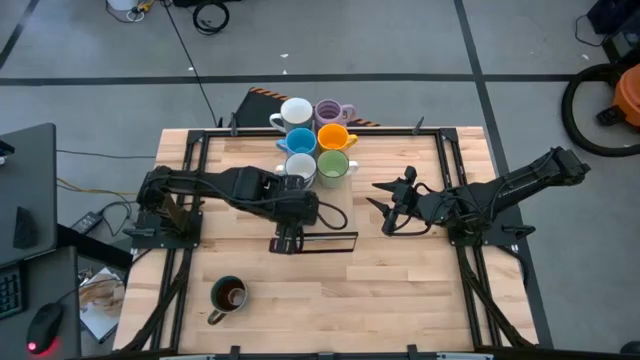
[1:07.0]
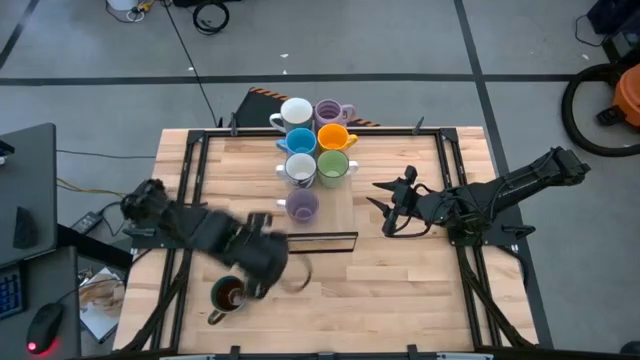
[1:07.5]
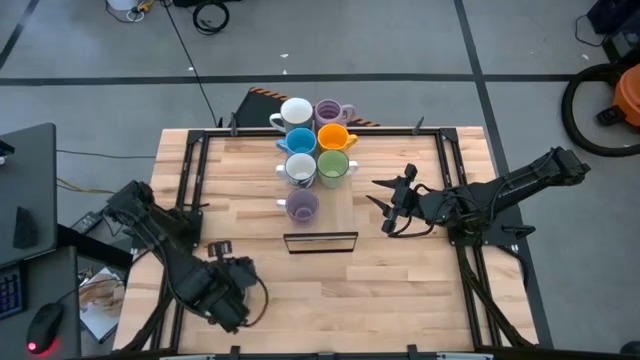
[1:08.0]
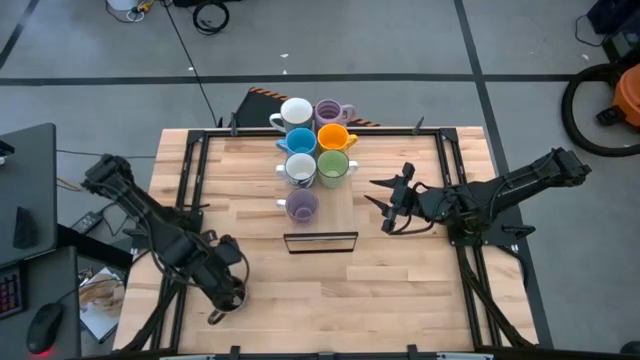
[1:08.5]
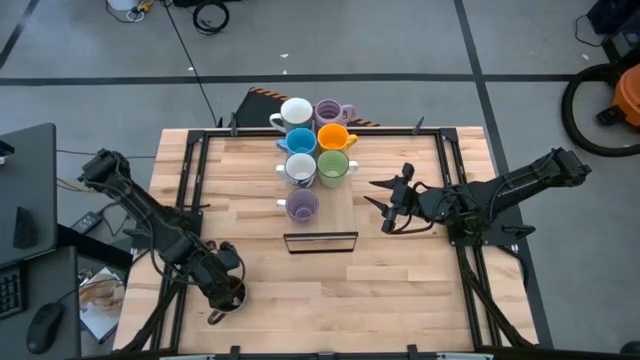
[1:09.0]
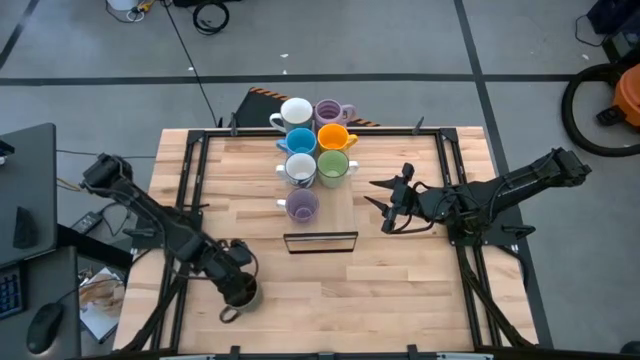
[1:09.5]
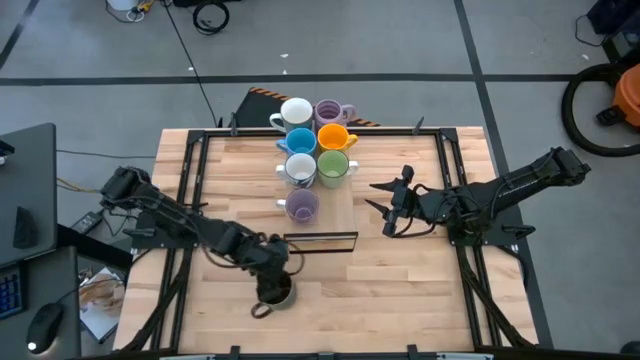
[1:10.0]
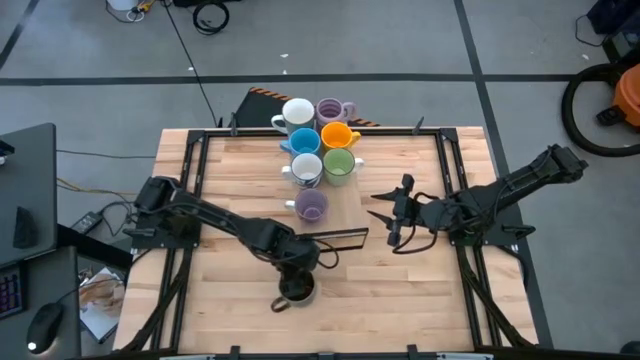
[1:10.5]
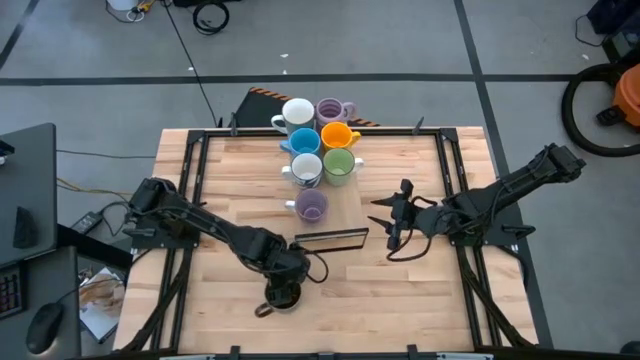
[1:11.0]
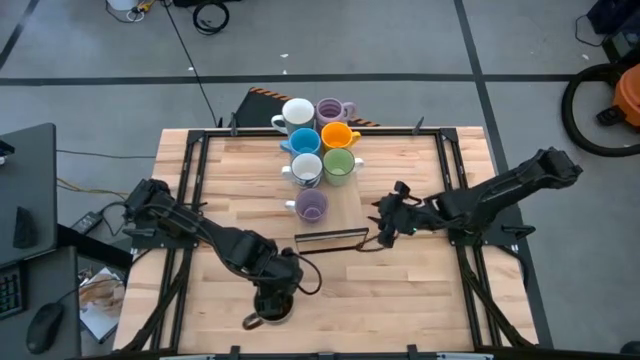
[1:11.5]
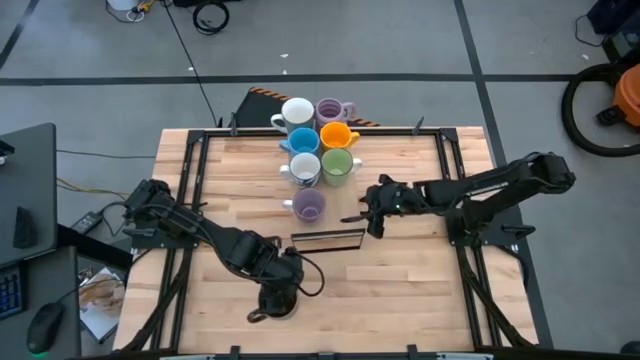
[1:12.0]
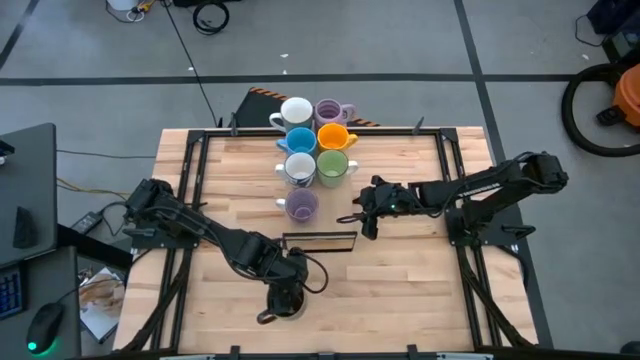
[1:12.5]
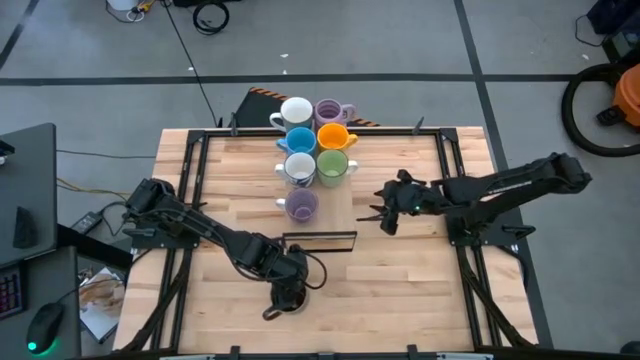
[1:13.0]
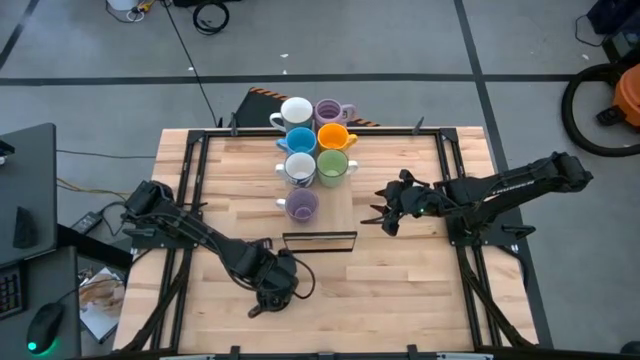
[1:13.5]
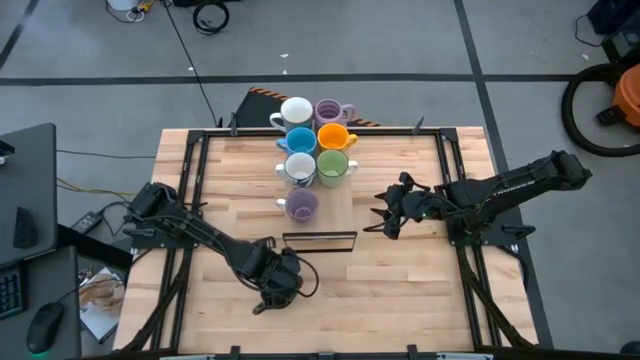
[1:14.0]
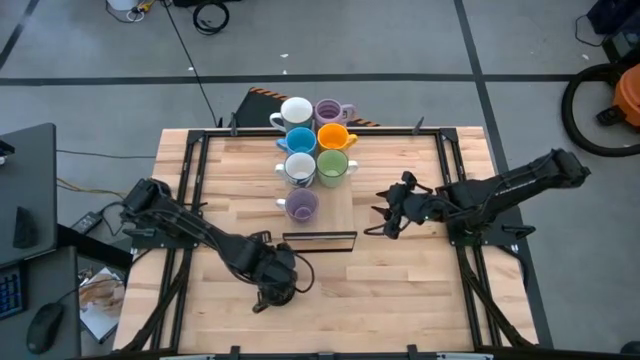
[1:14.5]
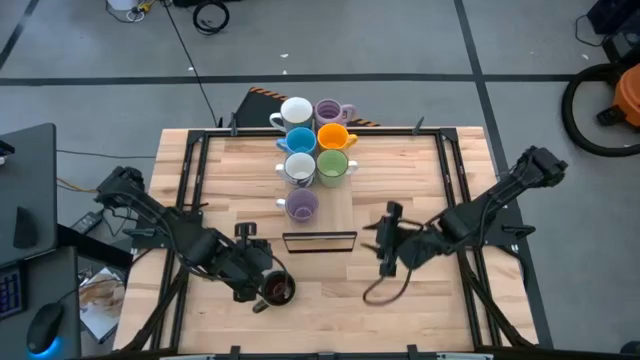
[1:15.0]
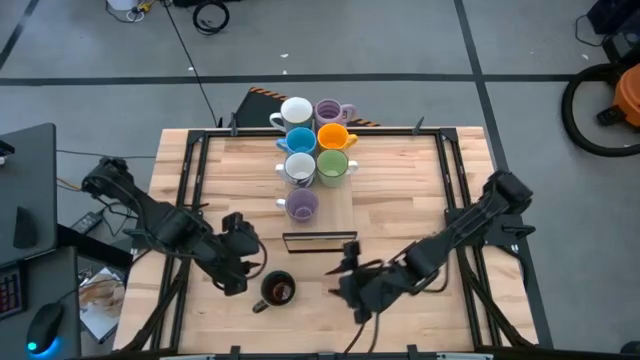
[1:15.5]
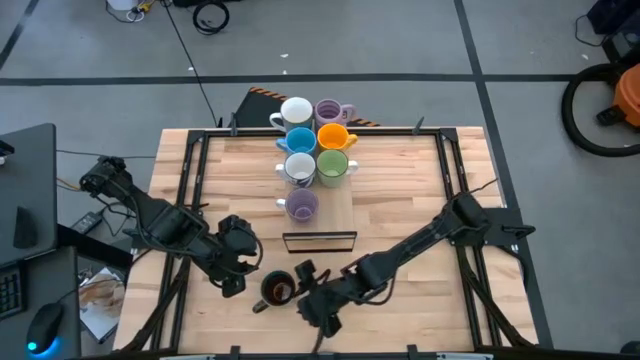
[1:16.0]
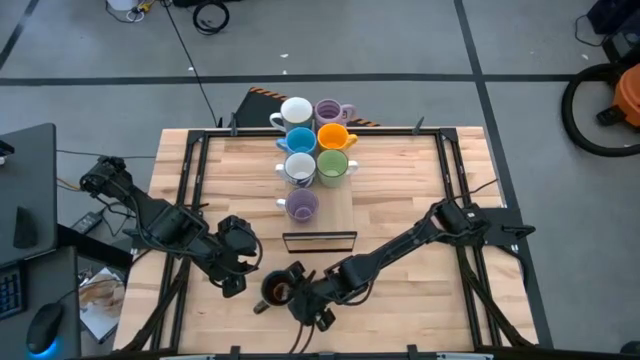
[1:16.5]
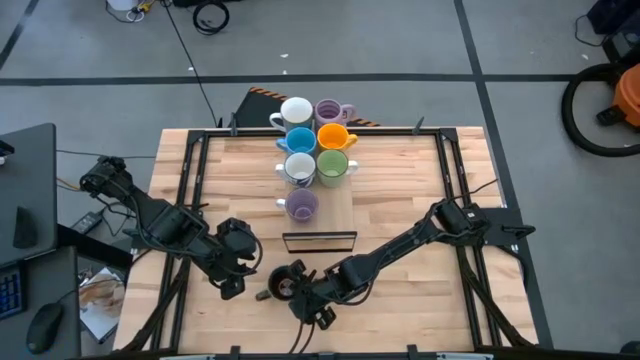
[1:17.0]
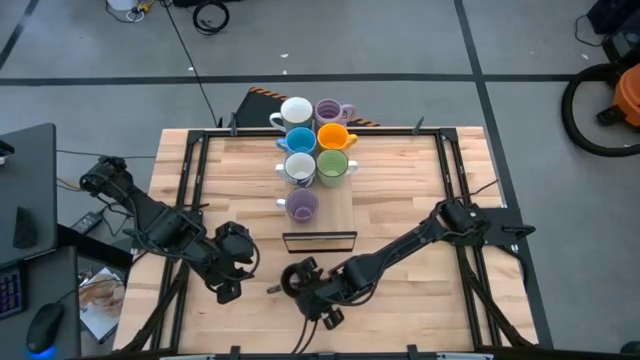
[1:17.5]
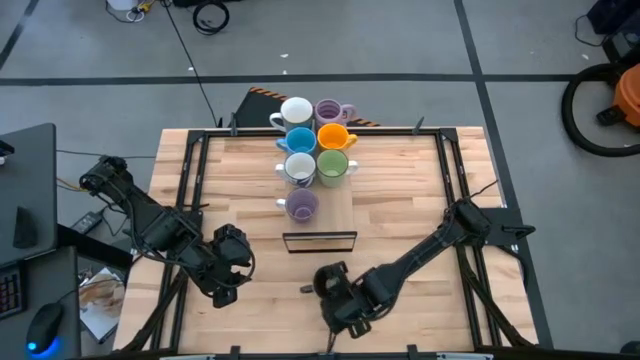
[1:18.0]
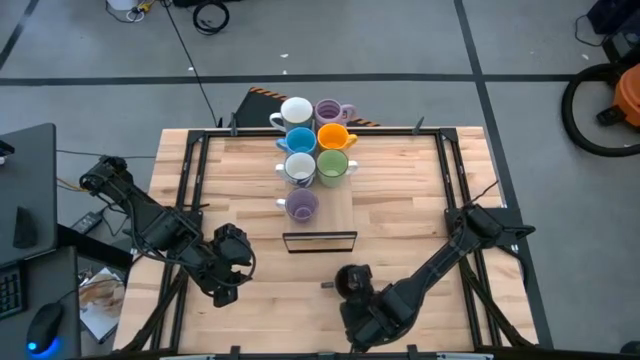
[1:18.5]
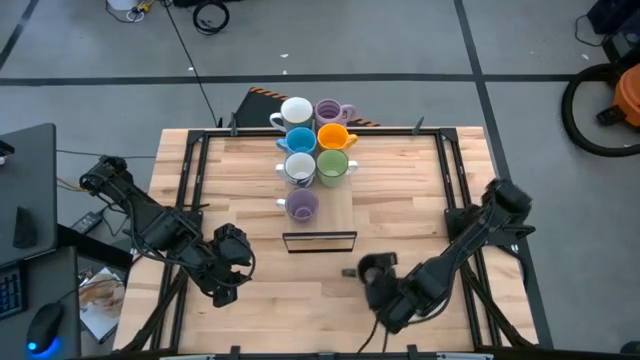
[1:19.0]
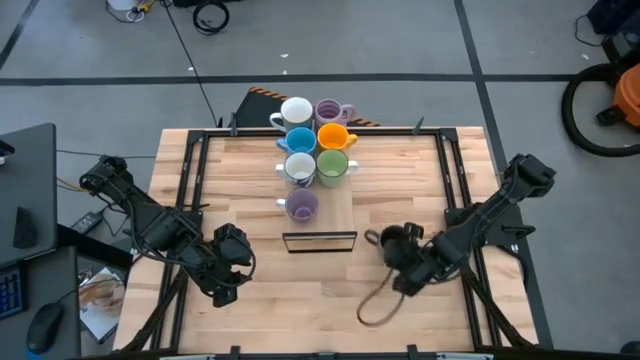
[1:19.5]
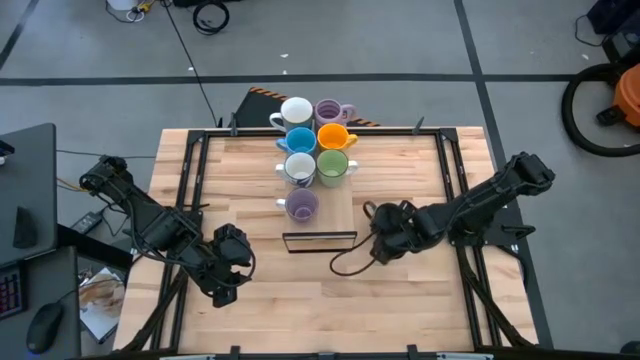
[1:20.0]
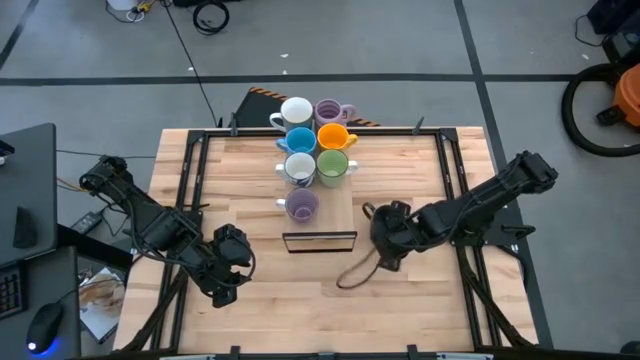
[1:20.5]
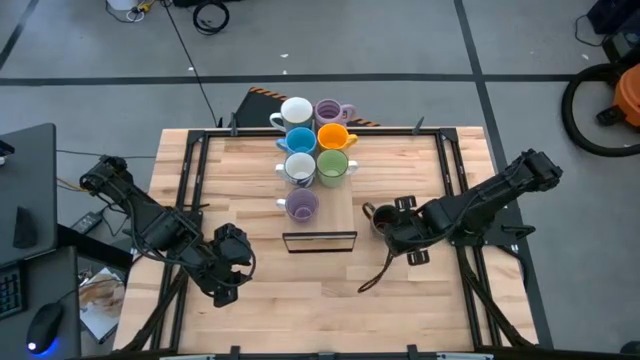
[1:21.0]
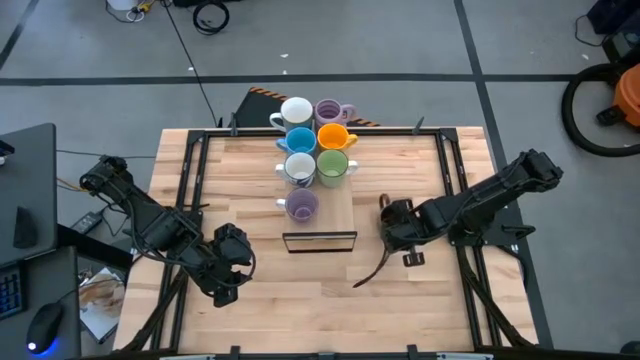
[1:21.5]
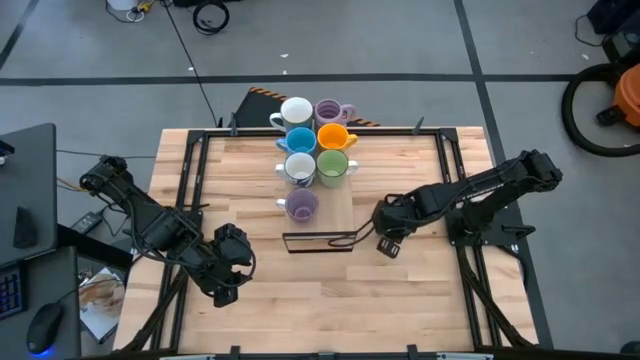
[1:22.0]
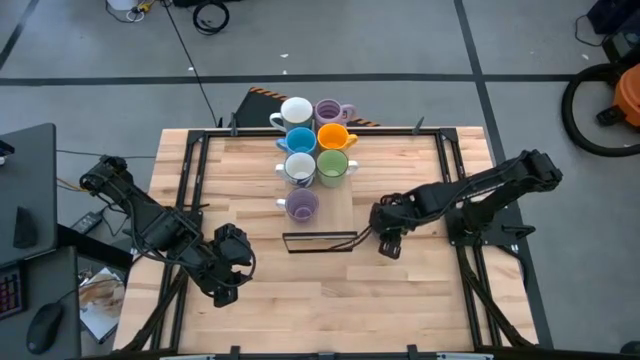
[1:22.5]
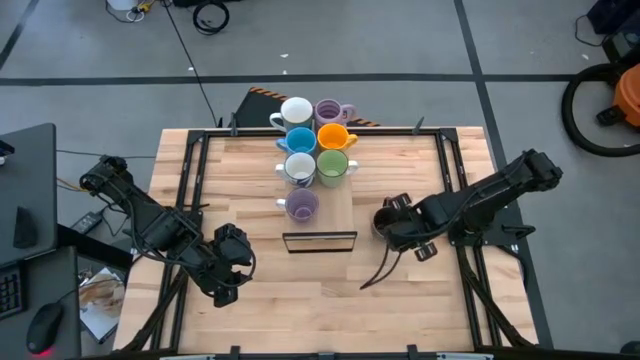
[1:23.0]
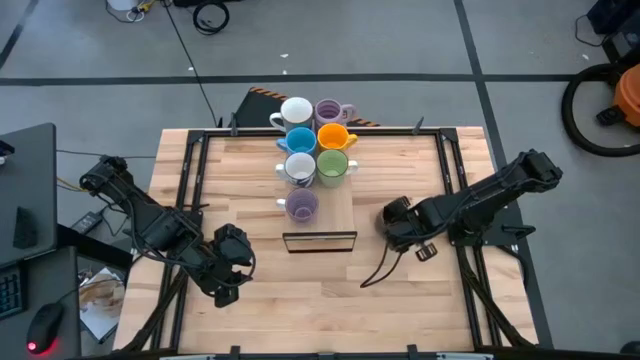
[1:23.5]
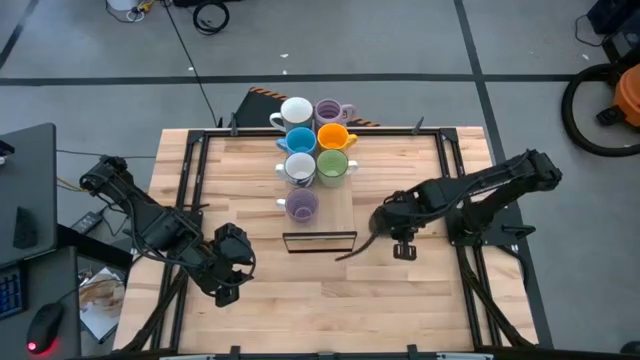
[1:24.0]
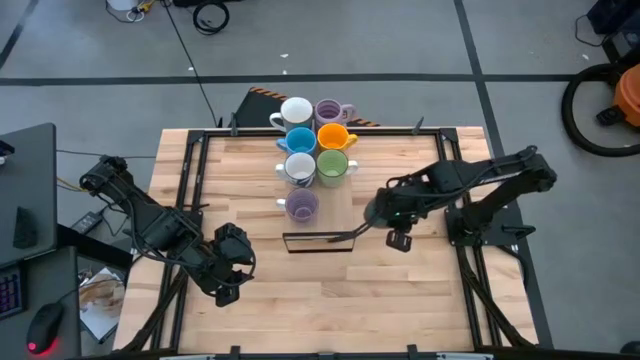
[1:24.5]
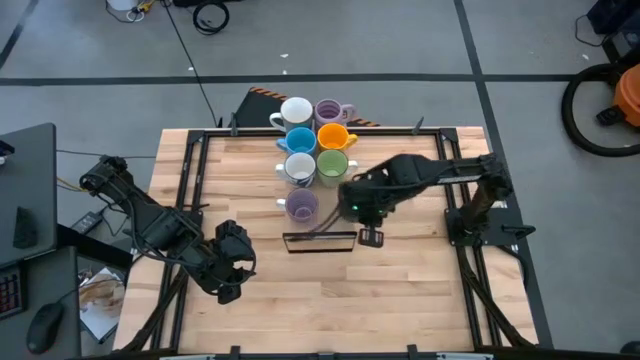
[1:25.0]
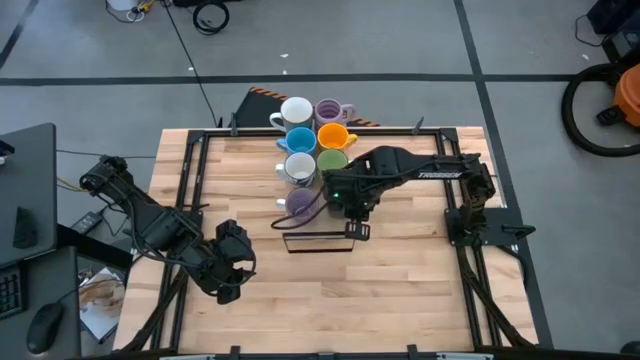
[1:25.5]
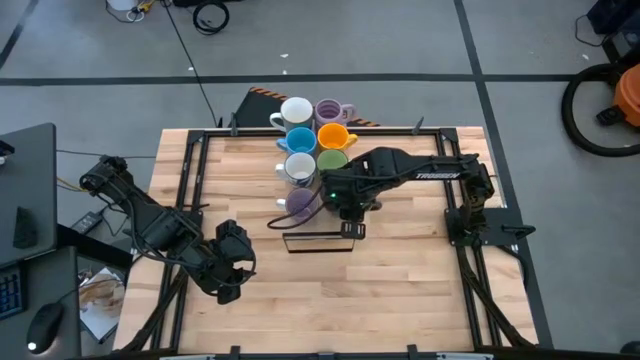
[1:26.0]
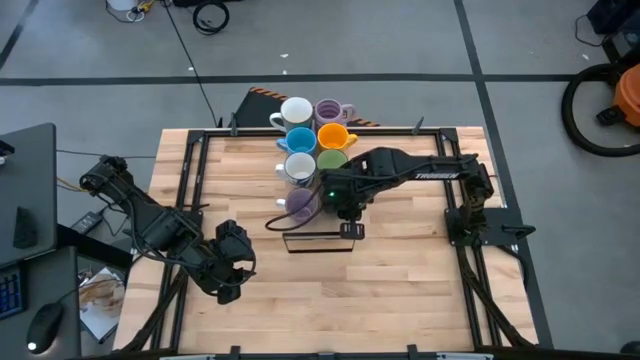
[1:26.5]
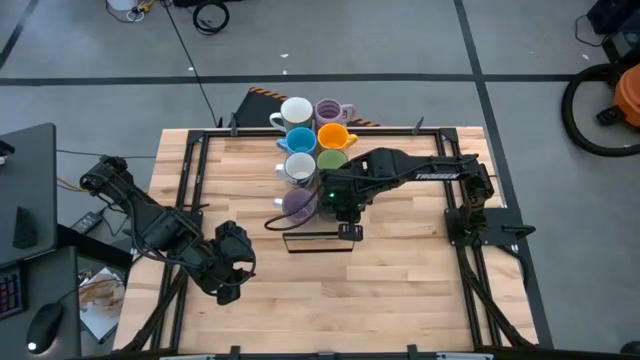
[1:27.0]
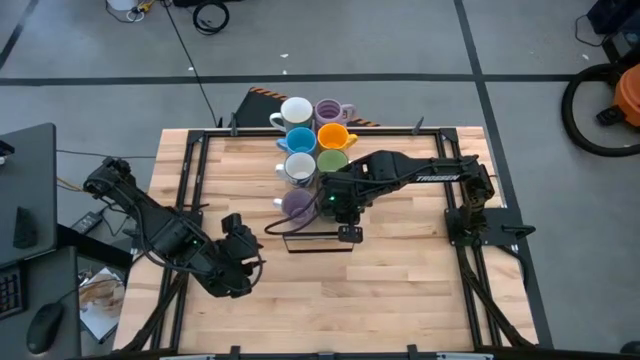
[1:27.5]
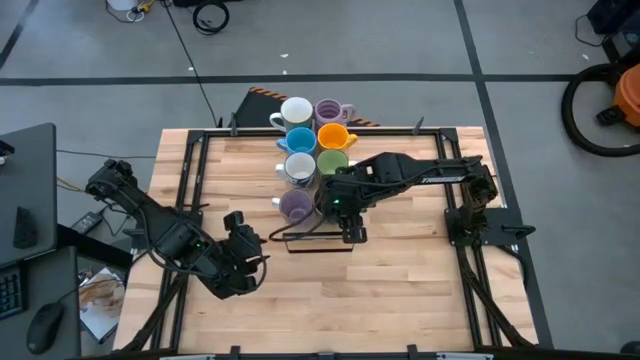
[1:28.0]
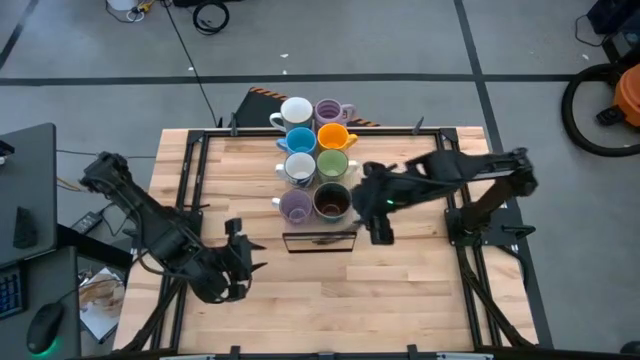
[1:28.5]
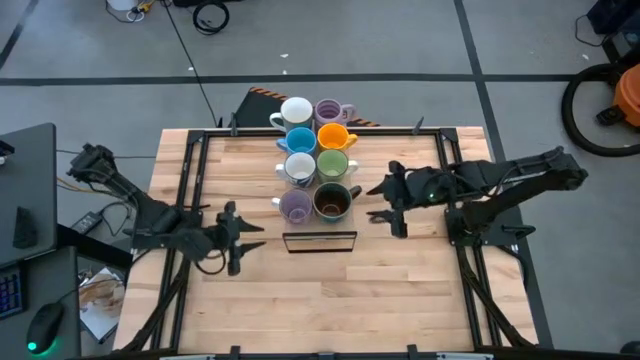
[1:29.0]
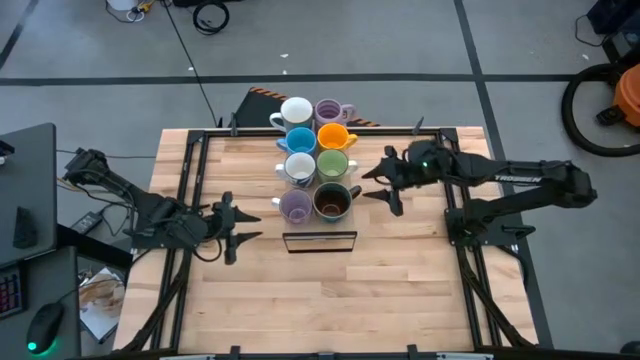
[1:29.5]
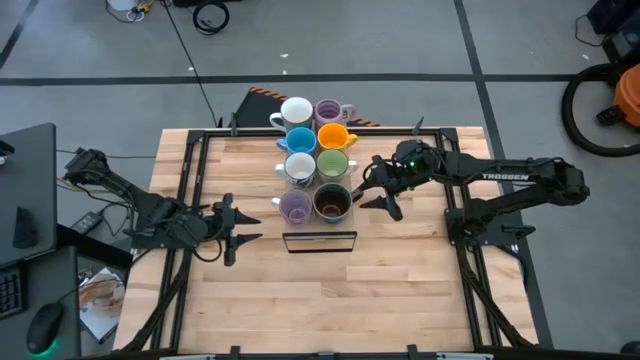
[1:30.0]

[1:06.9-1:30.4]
Task: Place coffee mugs
Put the blue brown mug on the shelf
